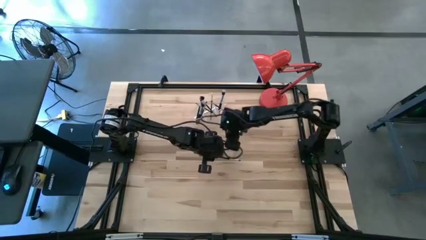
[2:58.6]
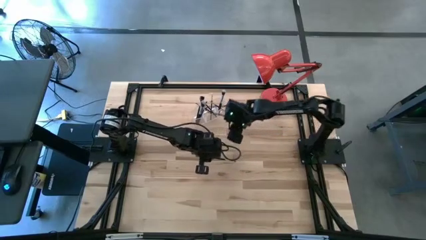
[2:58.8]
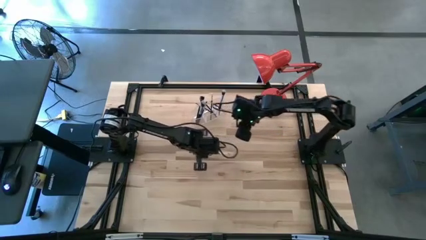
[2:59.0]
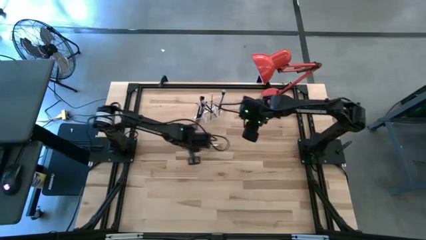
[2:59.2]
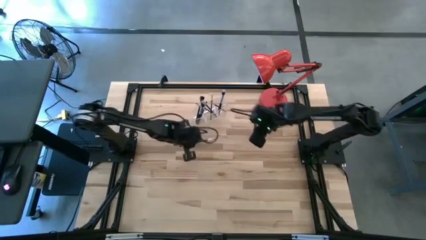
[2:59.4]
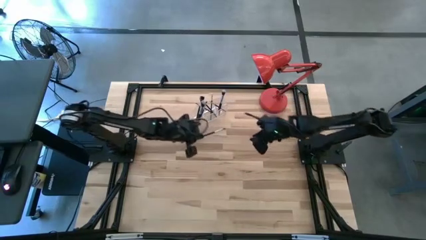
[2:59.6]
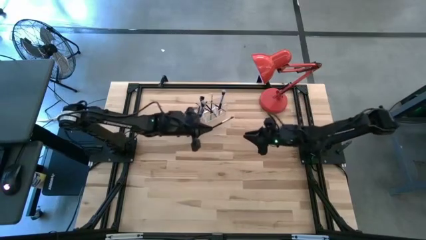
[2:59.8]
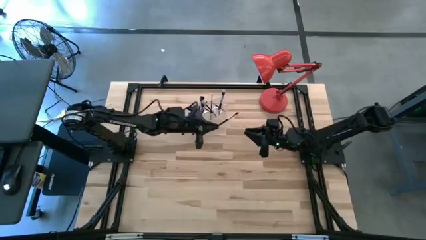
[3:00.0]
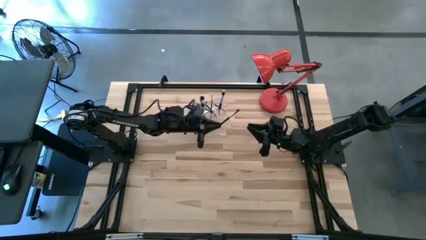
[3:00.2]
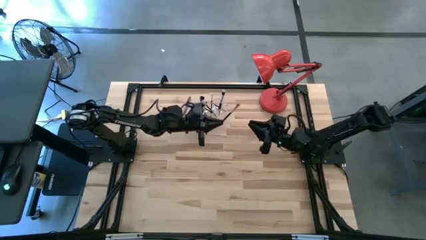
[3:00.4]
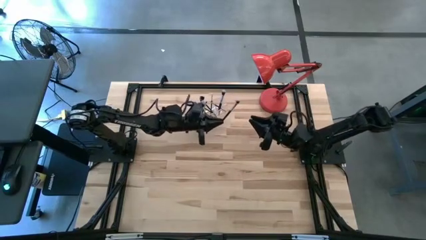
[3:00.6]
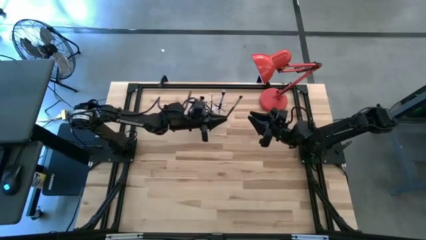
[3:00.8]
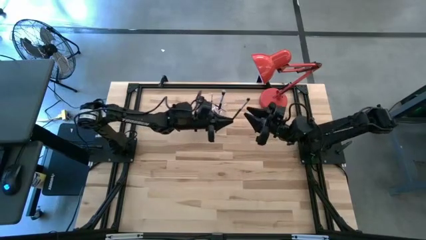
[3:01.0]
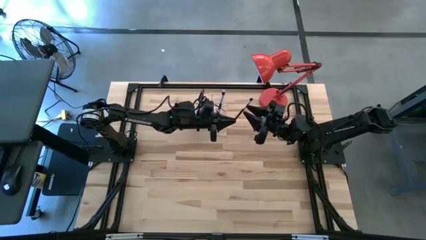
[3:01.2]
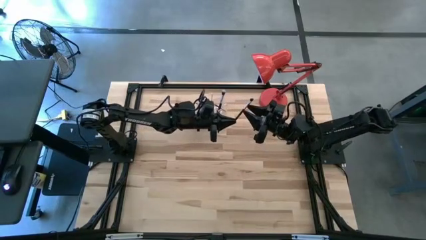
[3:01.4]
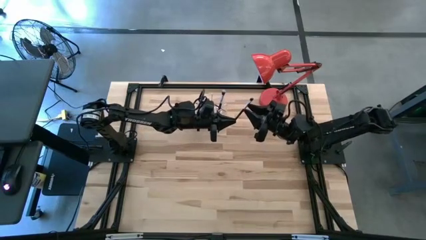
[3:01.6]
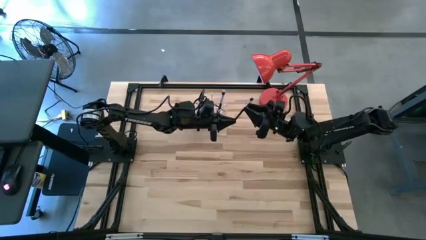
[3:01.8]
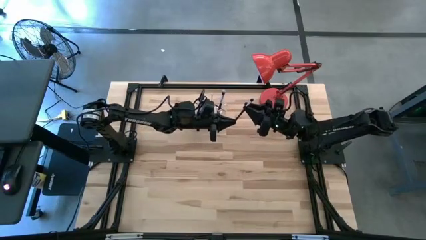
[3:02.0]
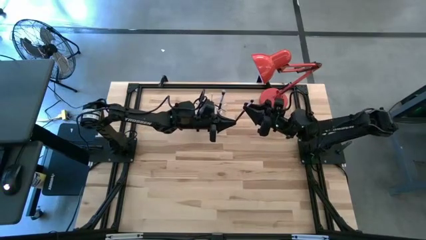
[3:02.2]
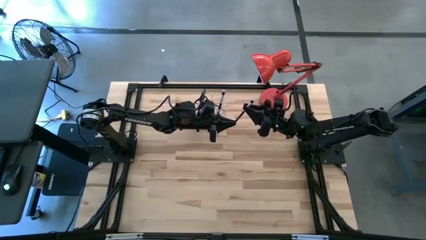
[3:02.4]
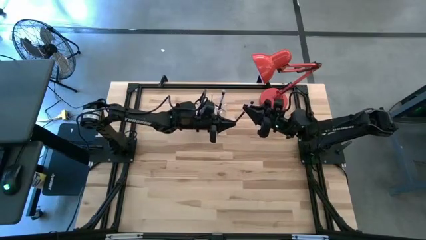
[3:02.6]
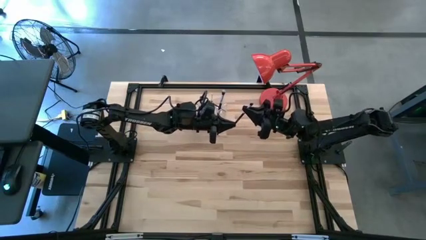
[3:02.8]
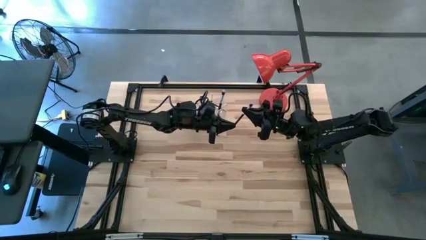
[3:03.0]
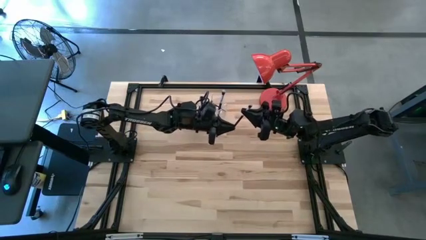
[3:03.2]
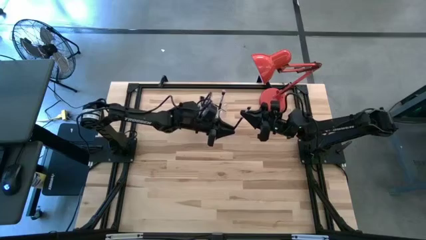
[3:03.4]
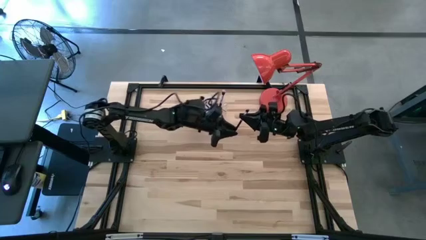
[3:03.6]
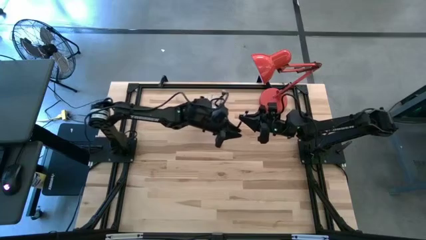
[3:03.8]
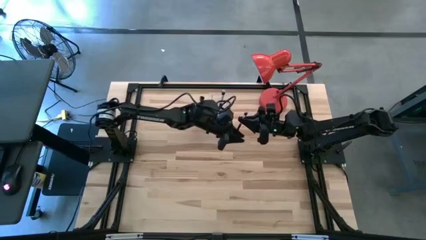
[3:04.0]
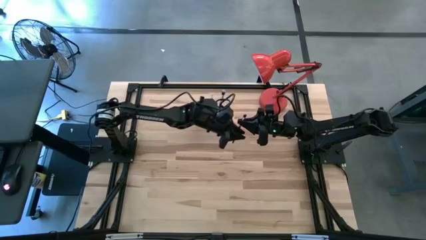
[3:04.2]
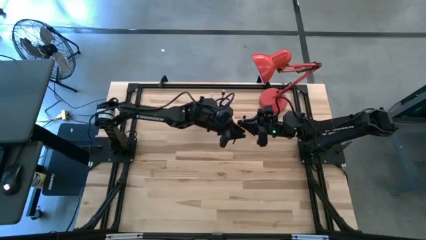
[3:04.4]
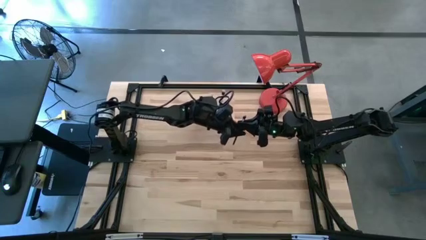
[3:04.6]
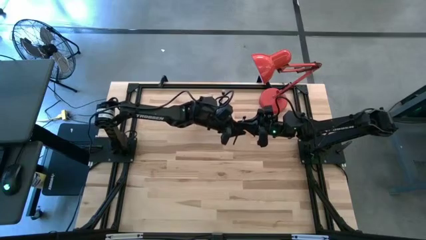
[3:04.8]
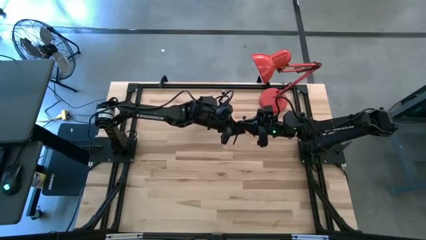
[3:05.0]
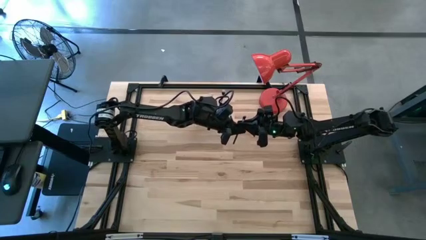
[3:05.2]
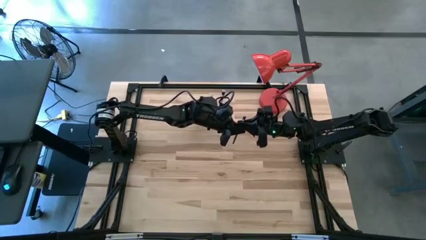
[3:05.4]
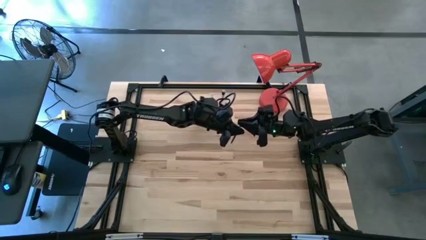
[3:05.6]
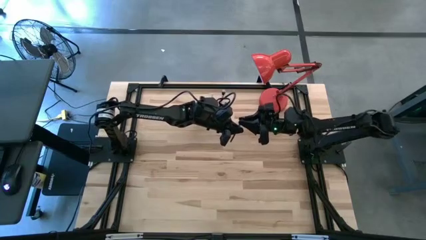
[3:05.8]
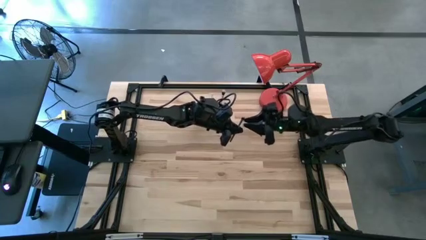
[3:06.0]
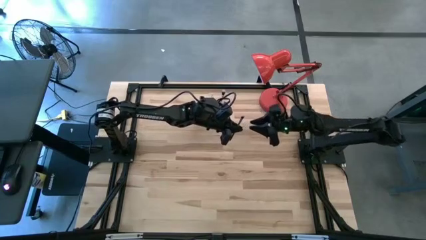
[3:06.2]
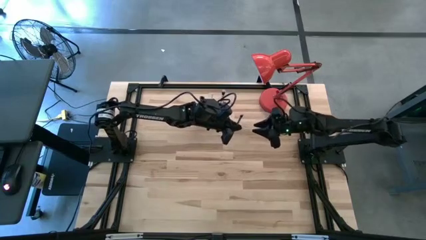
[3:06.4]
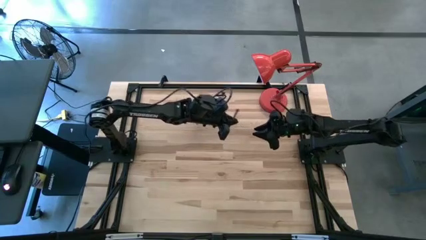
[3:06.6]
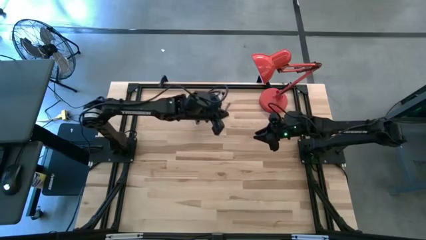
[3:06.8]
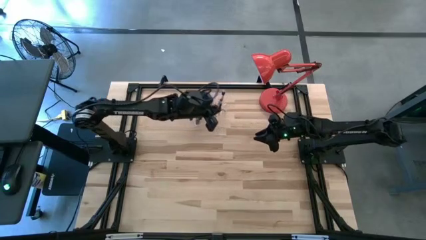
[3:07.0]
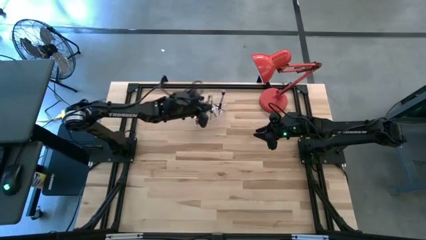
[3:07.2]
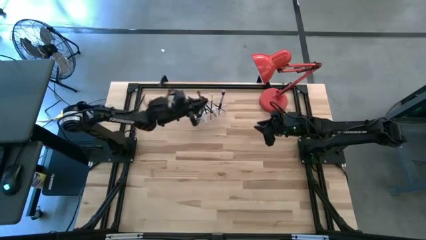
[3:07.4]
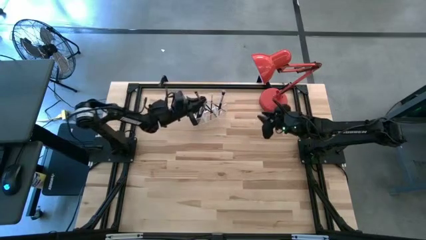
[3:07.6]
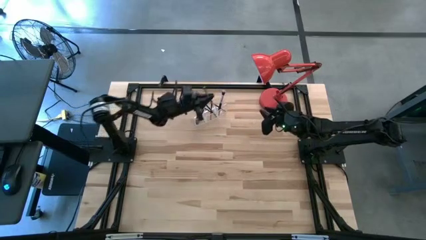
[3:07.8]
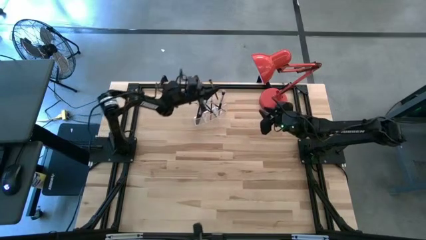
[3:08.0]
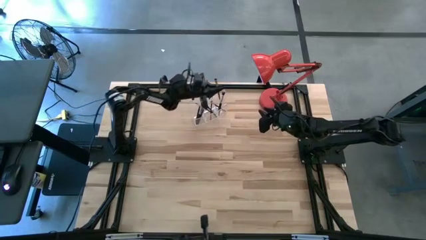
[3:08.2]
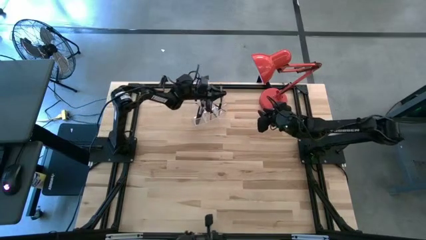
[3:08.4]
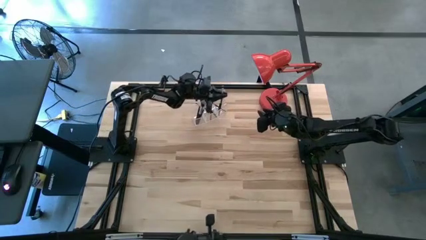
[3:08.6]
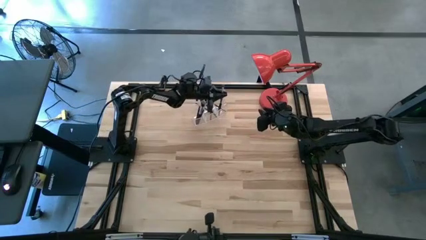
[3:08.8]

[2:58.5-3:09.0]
Task: Put items in baskets/containers
Put the black foundation brush into the transparent organizer

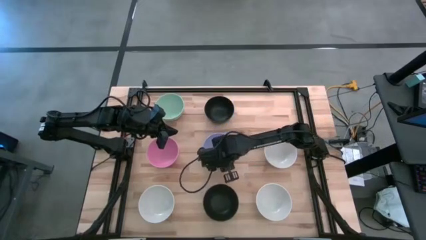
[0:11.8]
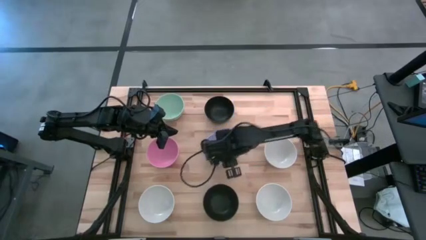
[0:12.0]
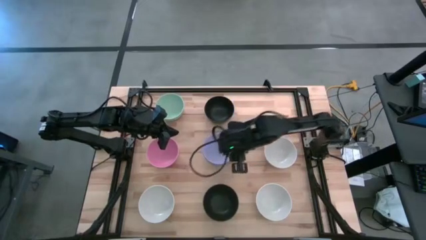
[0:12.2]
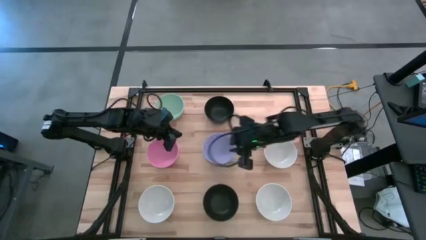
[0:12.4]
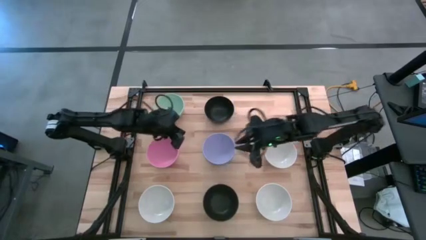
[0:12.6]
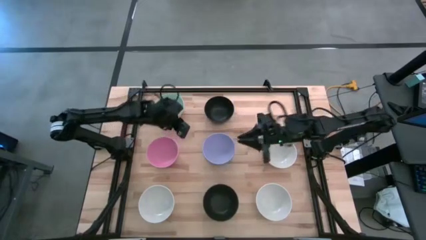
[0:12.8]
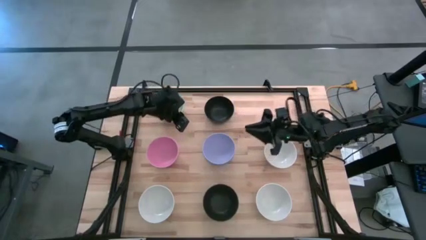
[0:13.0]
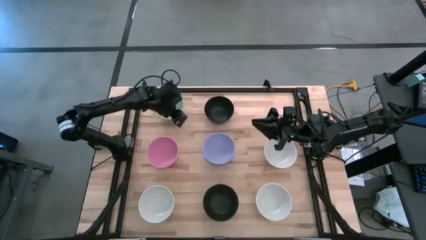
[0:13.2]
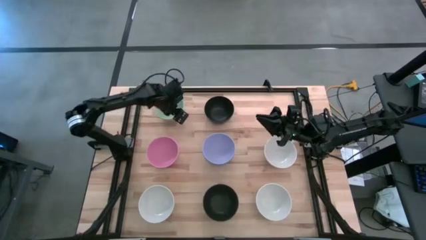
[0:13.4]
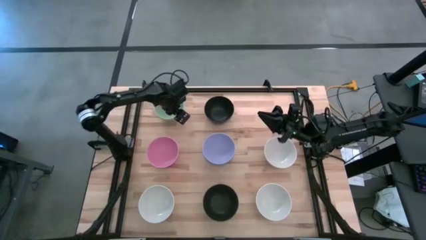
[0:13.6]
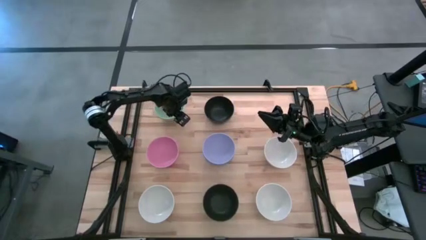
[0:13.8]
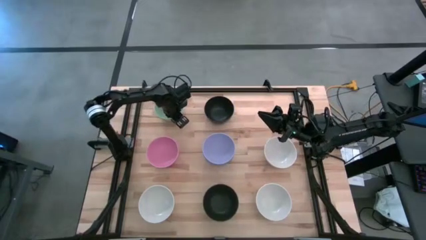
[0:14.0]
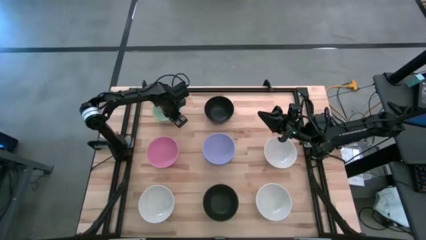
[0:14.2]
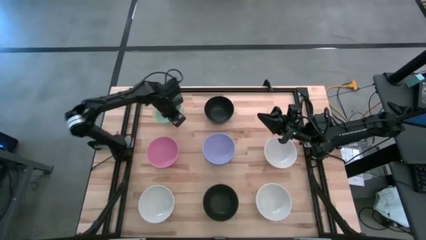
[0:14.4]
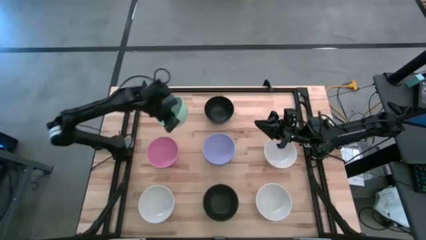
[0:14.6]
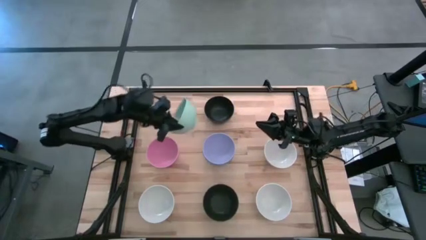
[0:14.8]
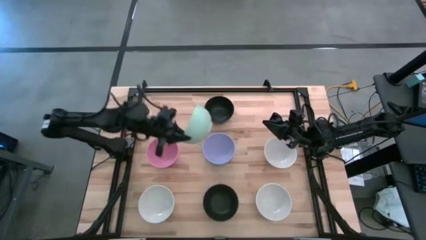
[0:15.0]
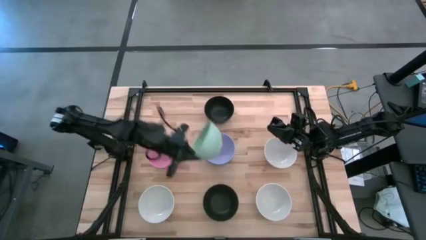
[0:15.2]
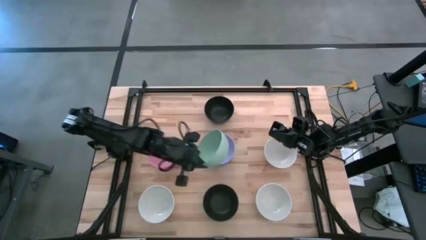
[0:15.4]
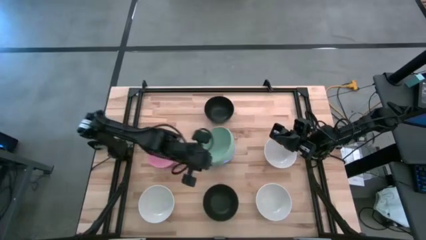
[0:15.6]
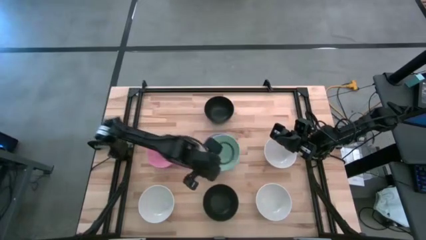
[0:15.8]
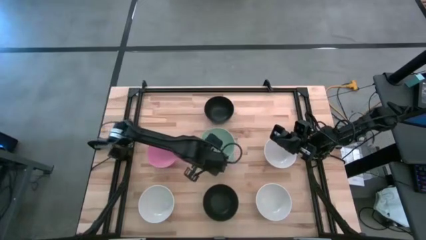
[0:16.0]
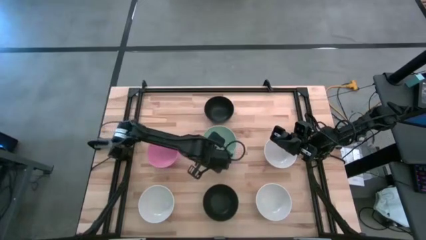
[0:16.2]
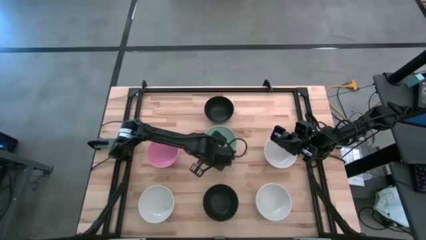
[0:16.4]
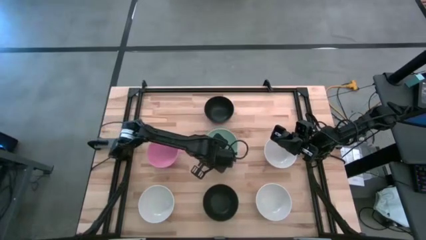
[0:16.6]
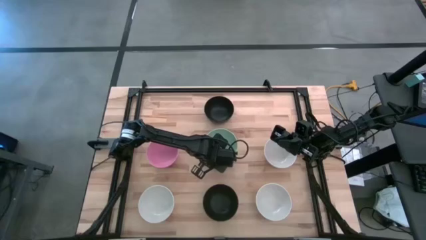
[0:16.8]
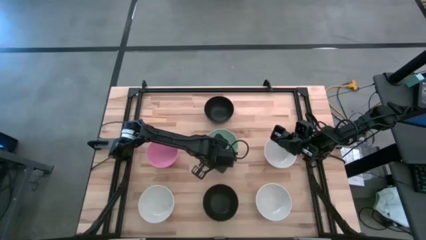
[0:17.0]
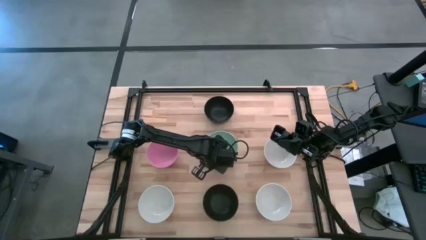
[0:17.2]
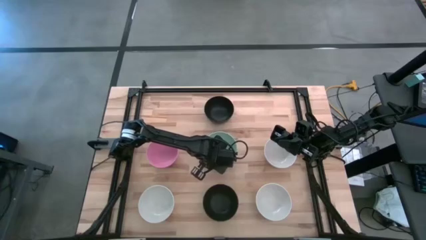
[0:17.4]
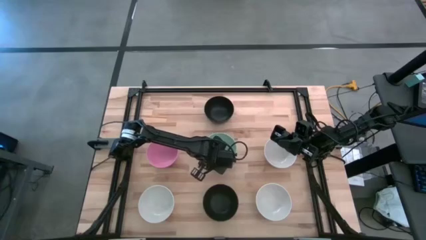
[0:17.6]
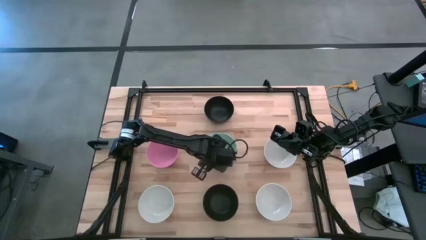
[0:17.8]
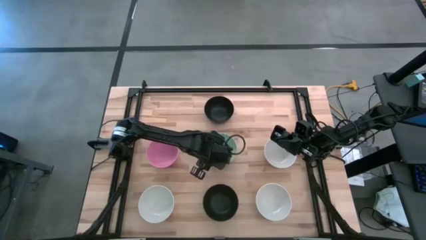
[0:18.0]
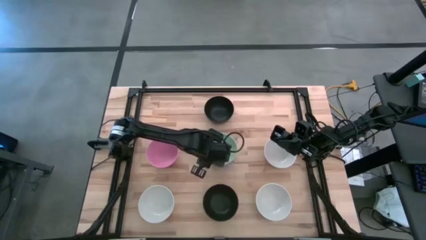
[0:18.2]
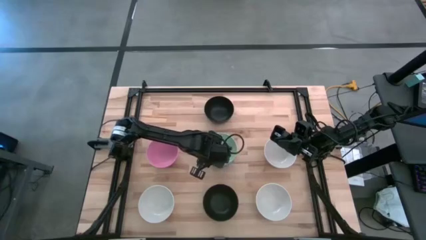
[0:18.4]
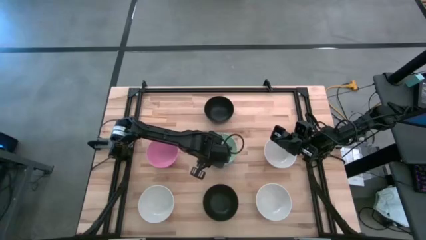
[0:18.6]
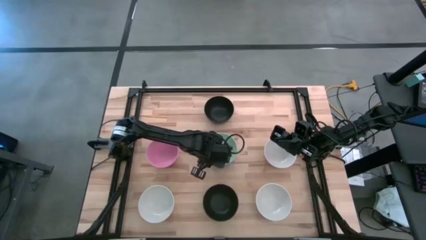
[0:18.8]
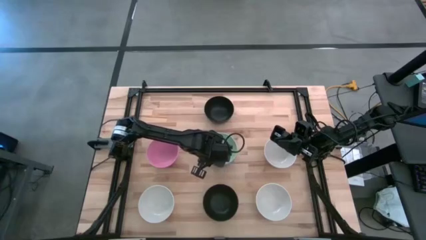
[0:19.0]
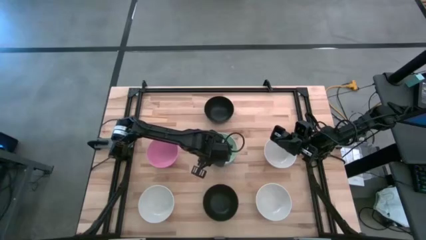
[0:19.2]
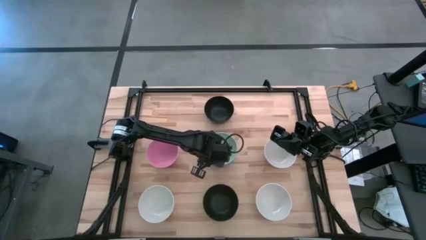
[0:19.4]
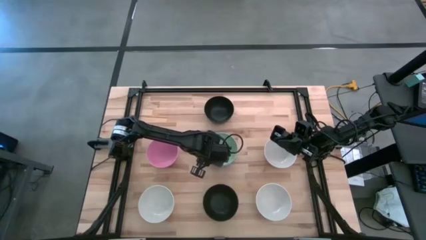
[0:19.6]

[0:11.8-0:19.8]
Task: Nest bowls inside each other
Stack the green bowl on top of the purple bowl
